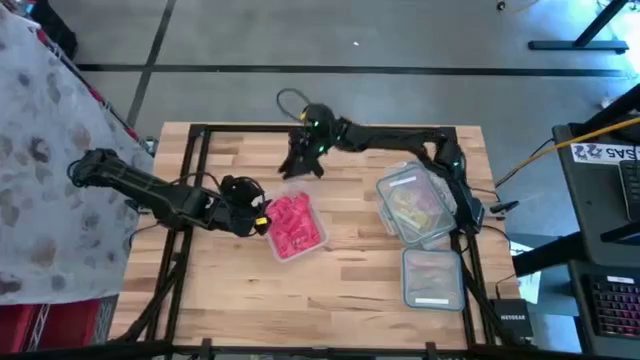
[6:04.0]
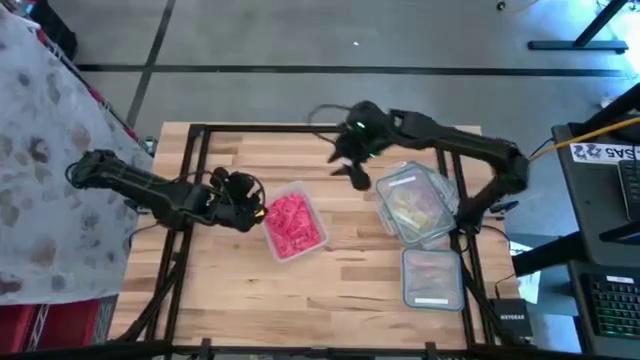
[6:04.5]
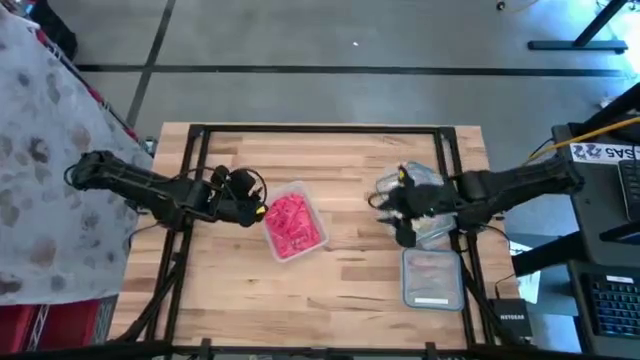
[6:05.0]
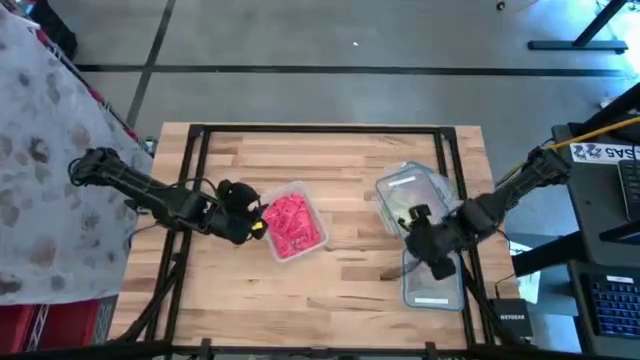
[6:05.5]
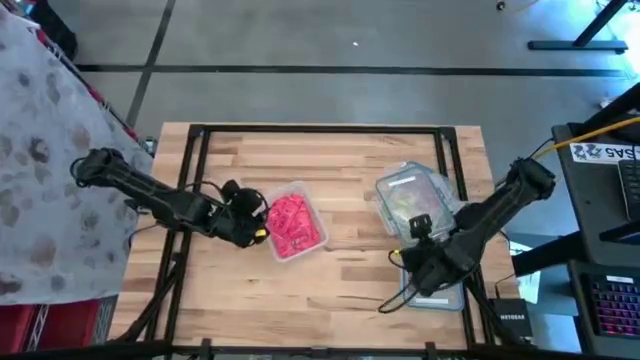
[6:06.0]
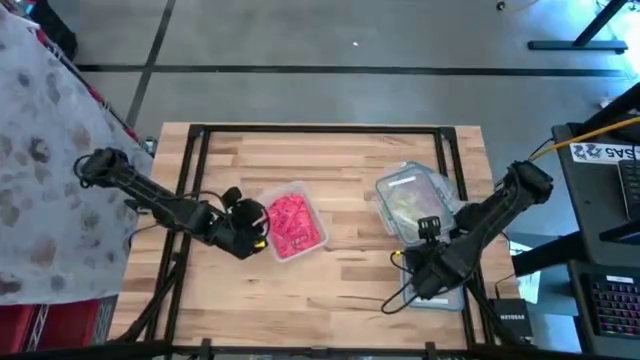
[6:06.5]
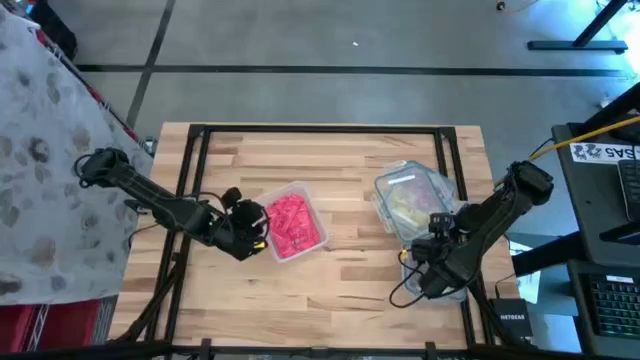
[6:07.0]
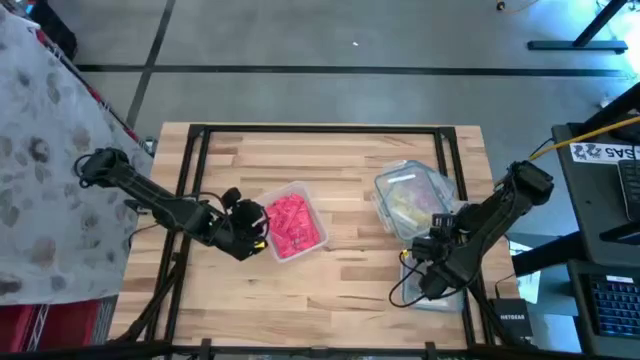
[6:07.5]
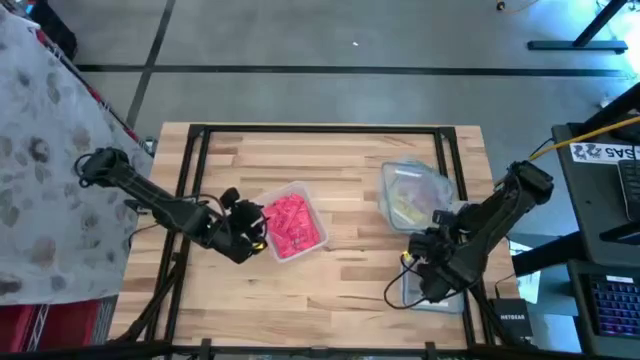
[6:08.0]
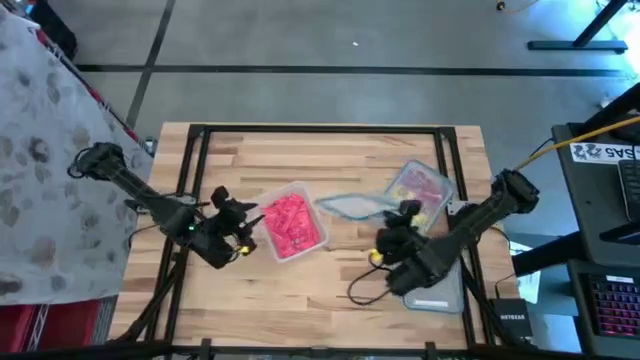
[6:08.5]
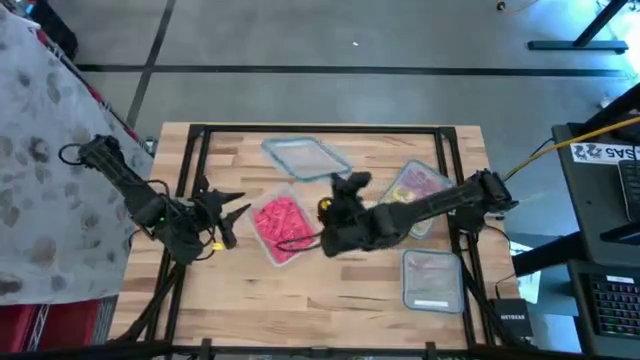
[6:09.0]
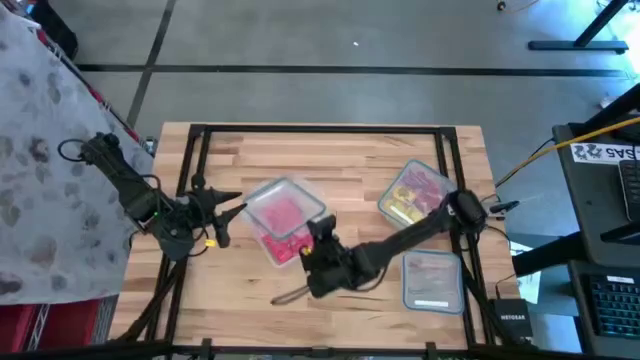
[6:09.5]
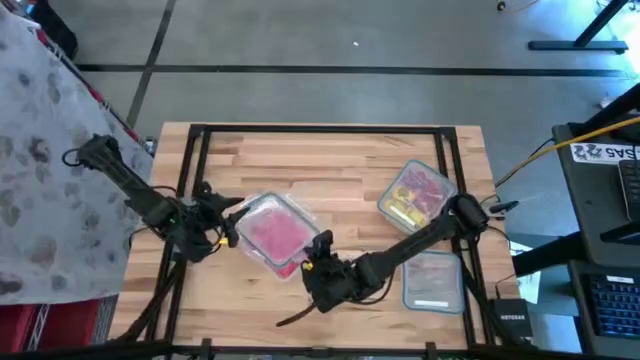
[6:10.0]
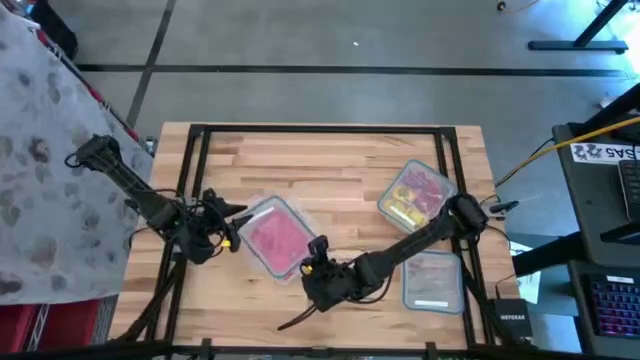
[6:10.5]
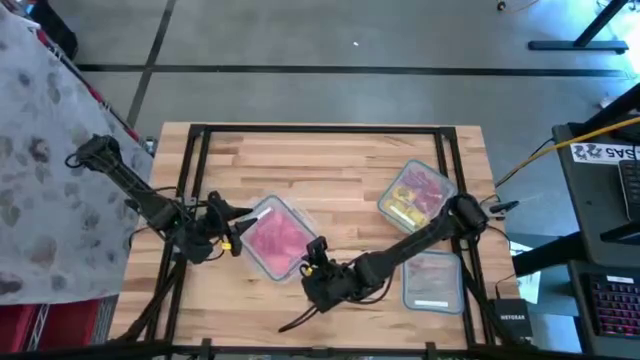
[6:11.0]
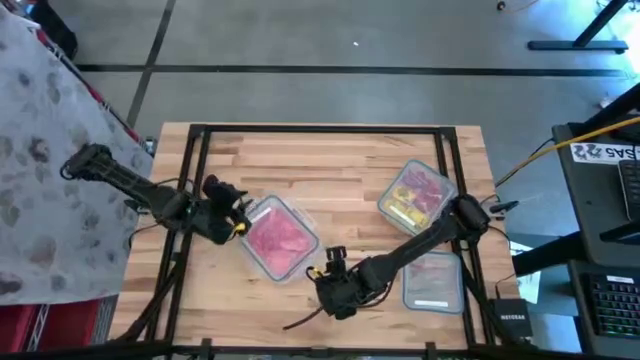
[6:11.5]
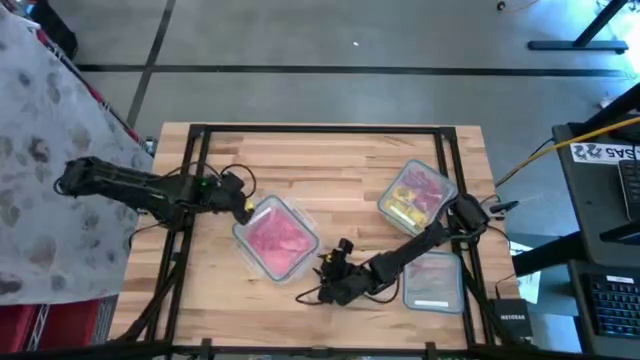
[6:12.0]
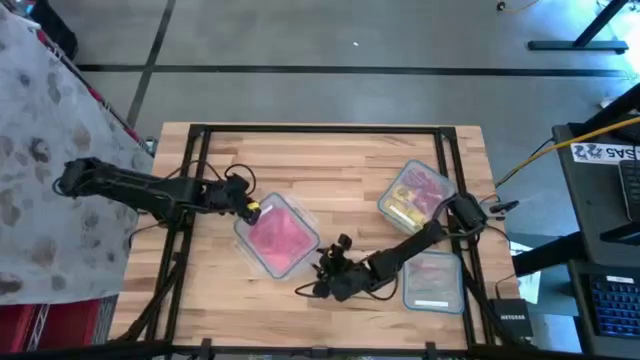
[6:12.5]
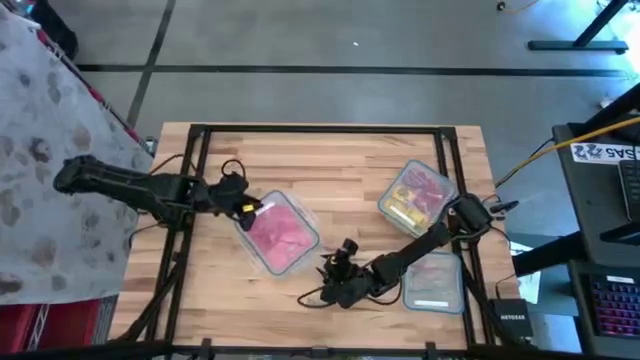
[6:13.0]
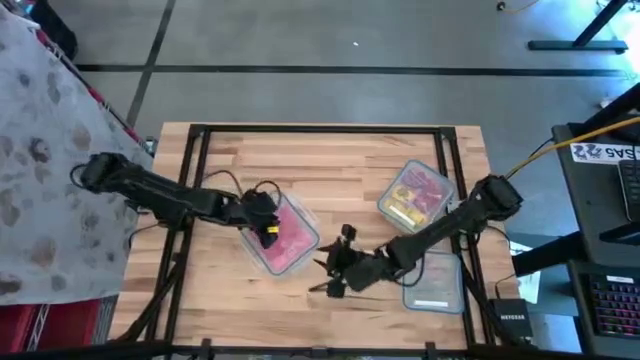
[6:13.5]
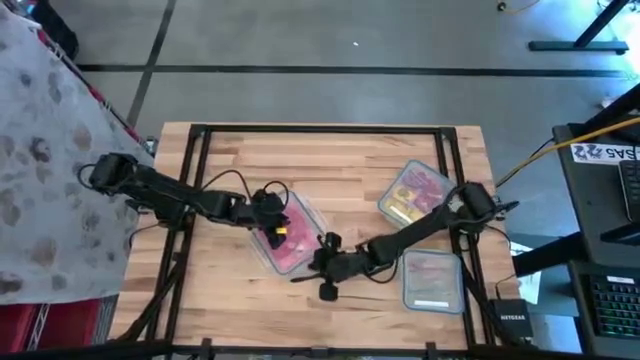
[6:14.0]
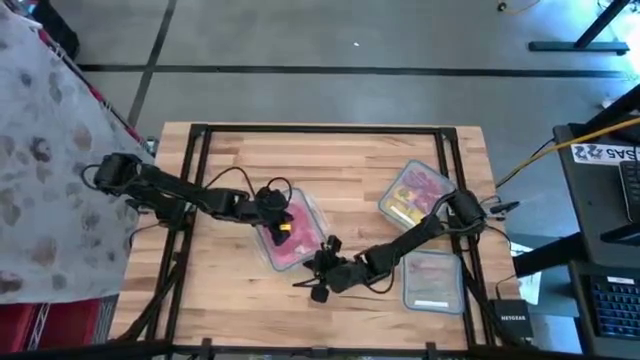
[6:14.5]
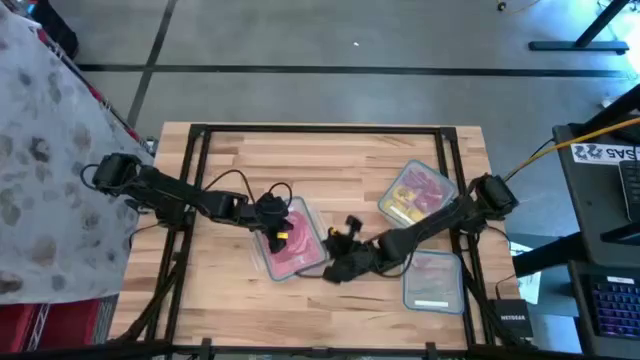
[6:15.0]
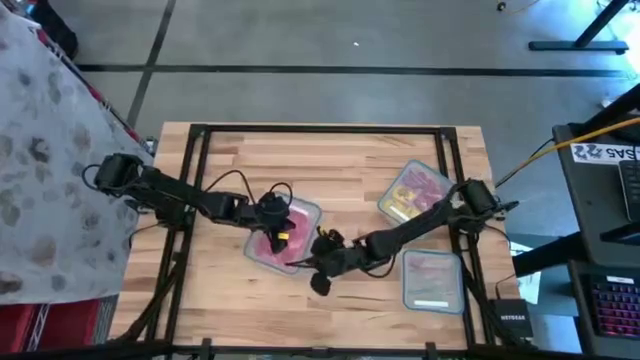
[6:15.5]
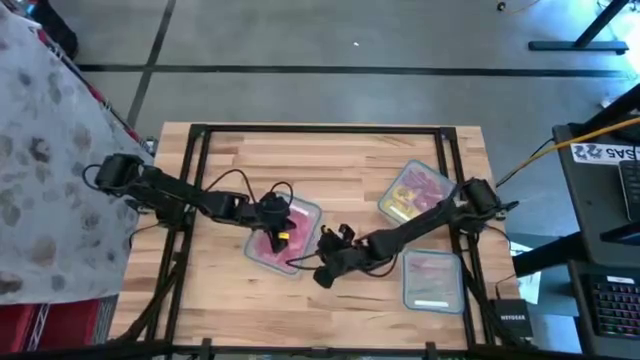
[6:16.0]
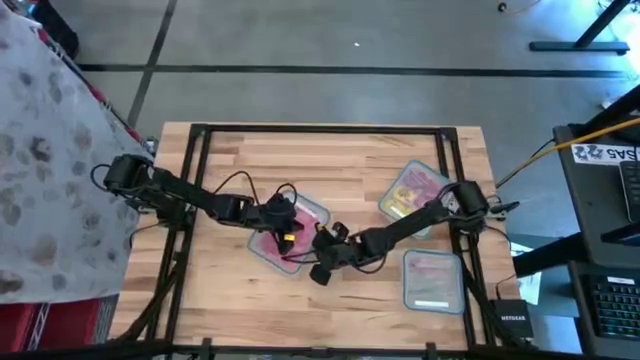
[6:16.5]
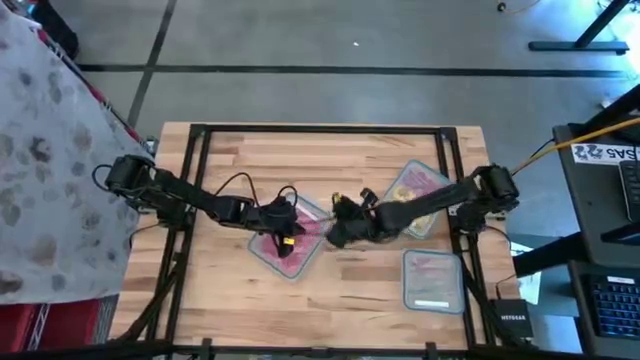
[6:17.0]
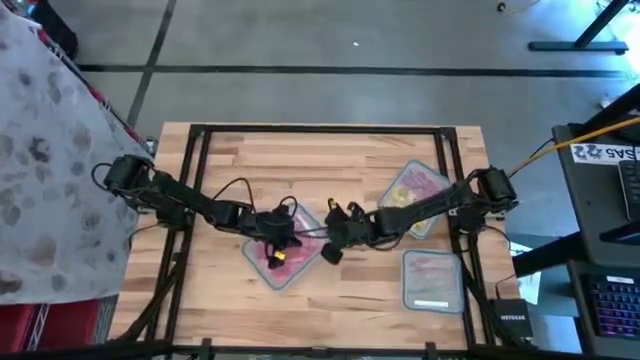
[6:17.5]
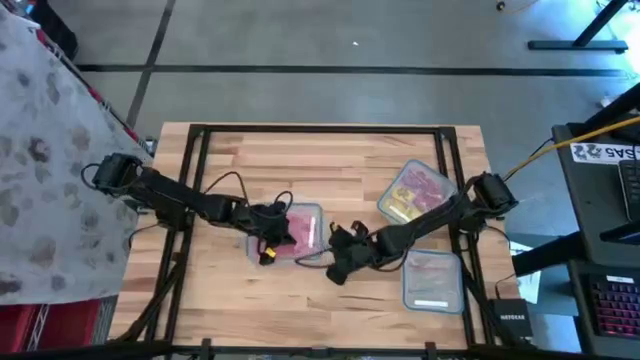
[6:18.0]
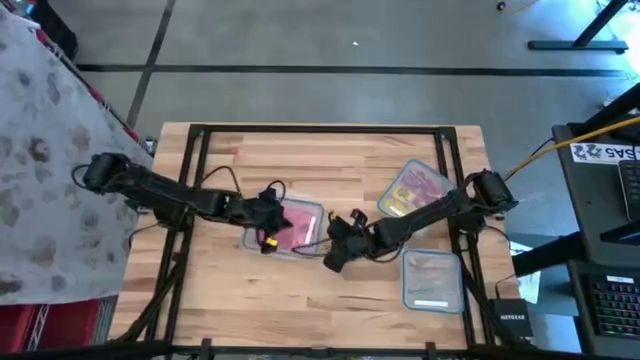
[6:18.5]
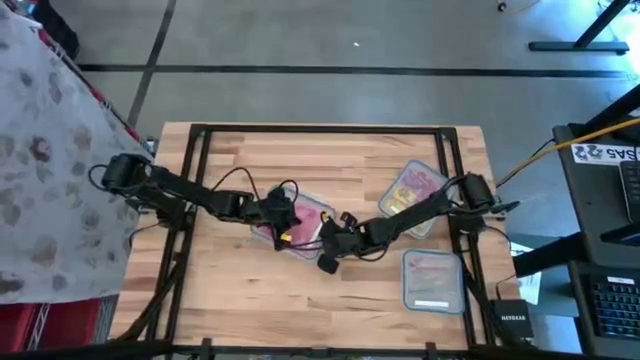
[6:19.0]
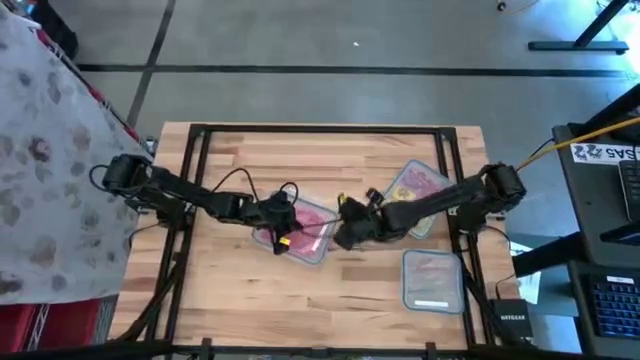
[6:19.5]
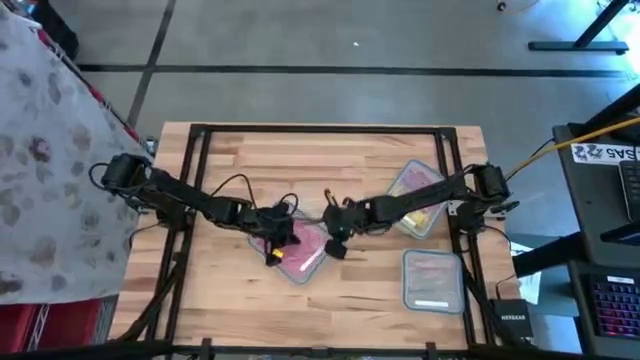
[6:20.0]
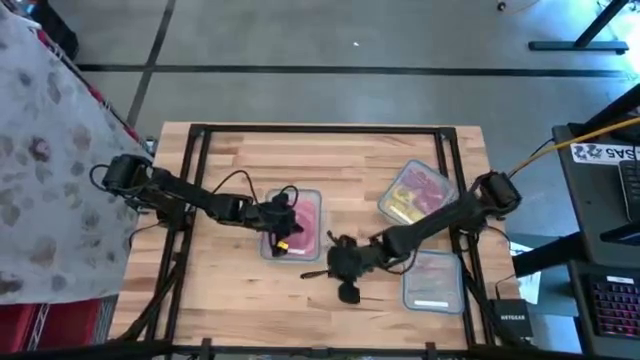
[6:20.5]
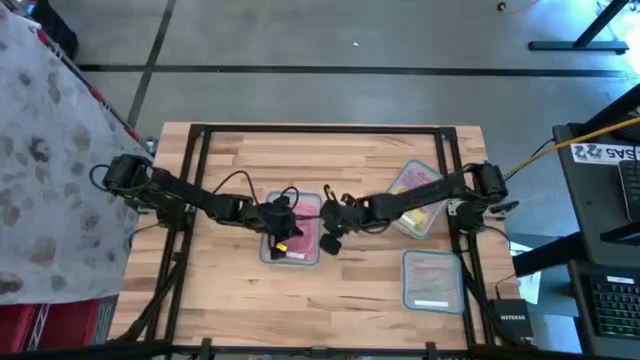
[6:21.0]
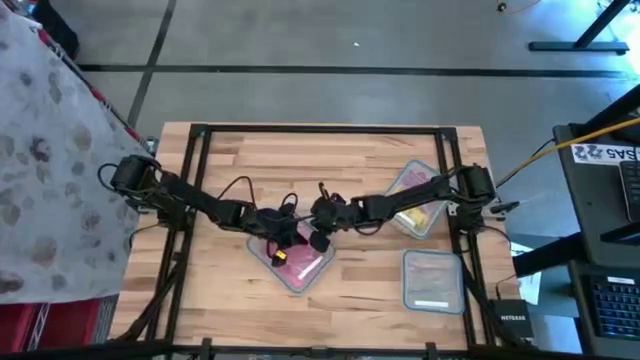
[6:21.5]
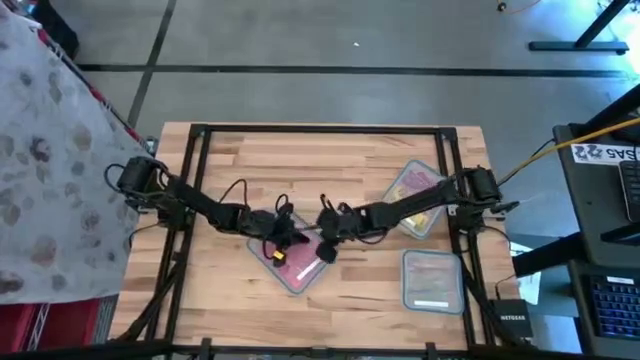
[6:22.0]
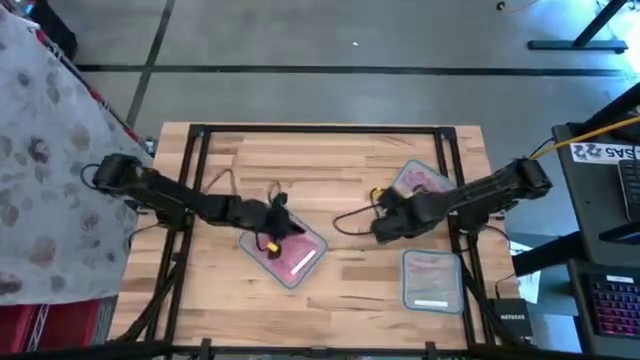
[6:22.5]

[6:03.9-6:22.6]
Task: Sort candy
Close the left transparent bin

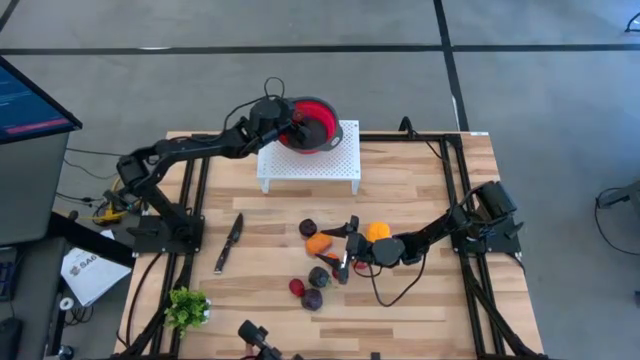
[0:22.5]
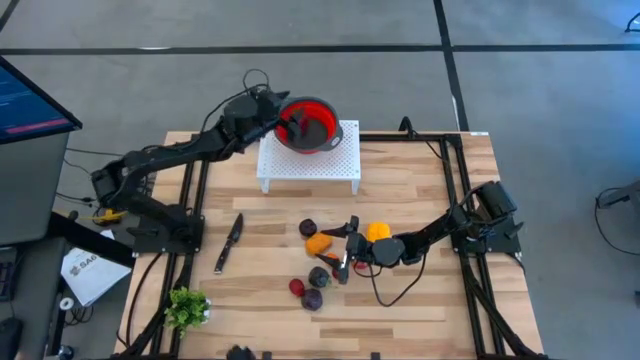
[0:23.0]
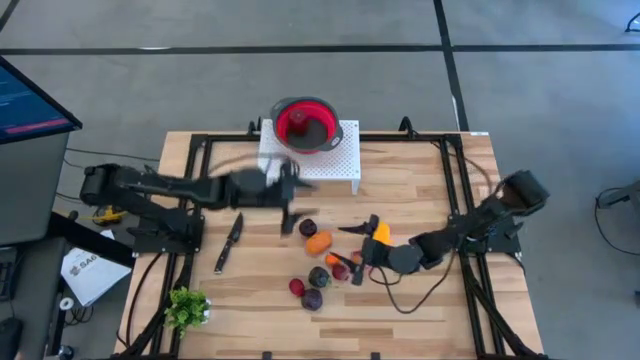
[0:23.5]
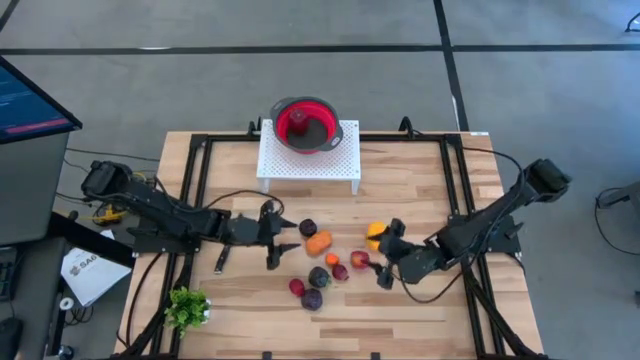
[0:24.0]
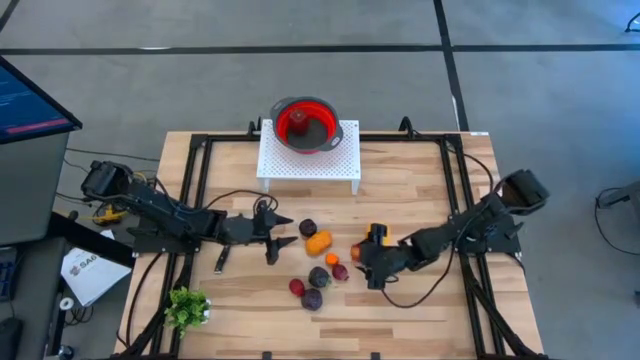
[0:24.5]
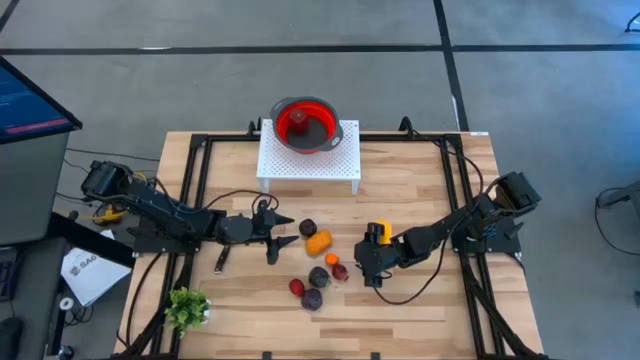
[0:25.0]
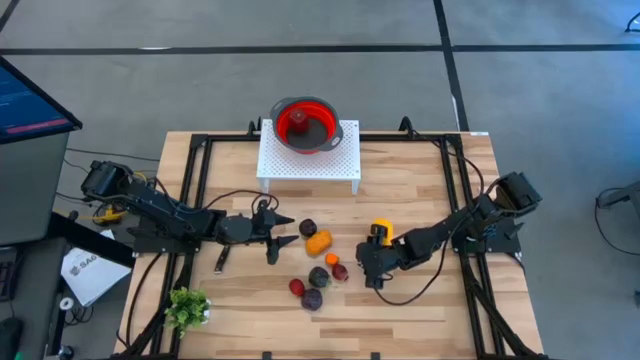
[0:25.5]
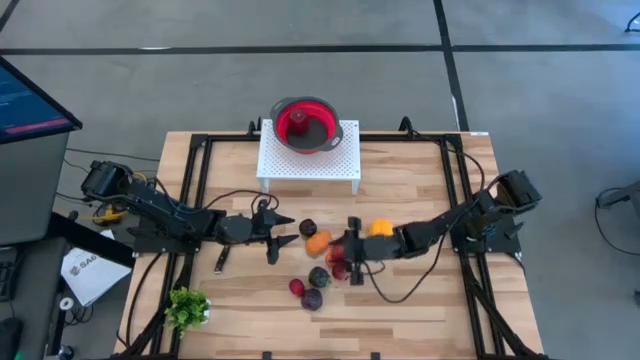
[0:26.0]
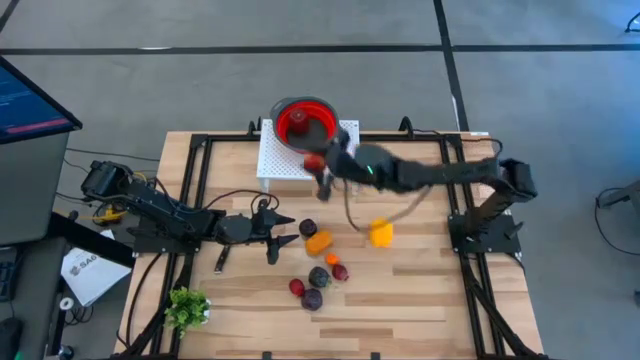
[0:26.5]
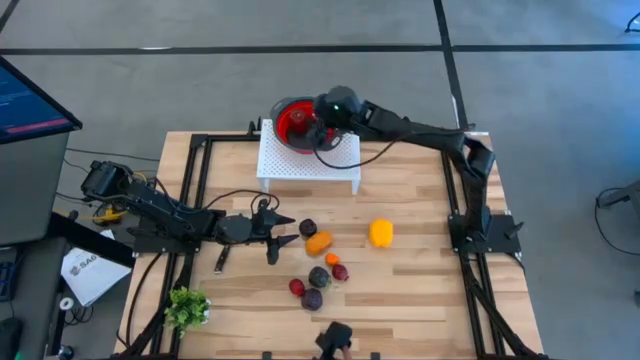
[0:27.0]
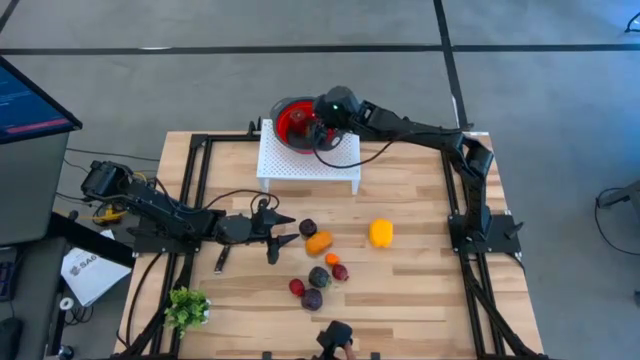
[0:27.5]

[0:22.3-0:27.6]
Task: Pick & Place Fruit
Put the red apple into the red strainer bowl on the shelf
